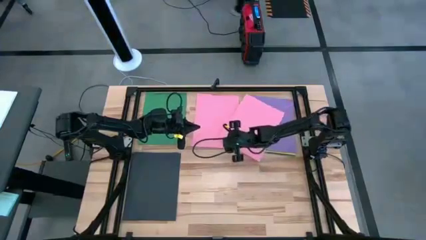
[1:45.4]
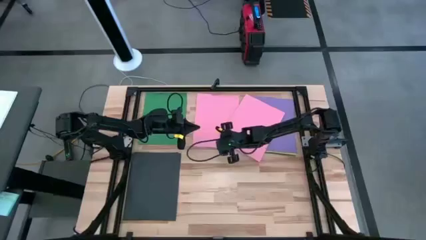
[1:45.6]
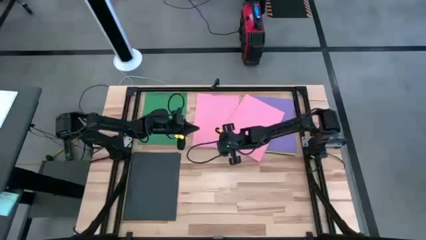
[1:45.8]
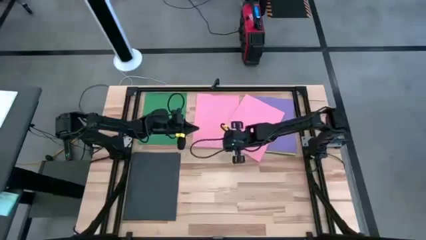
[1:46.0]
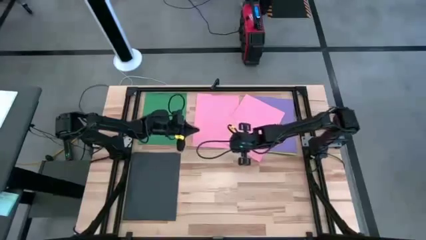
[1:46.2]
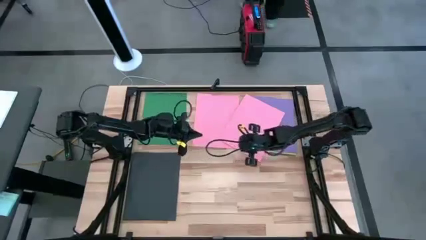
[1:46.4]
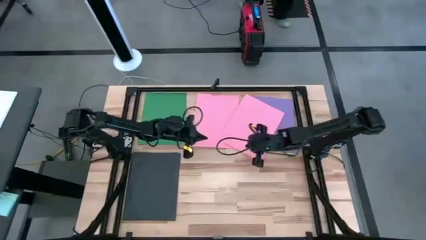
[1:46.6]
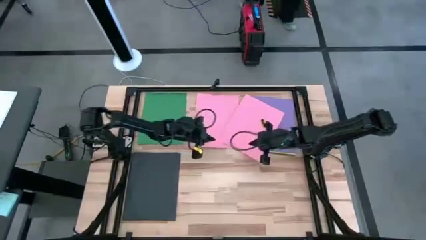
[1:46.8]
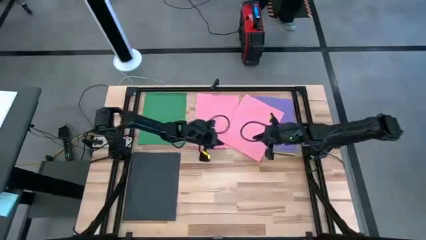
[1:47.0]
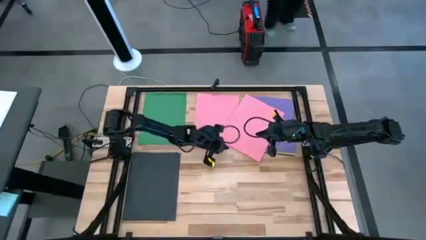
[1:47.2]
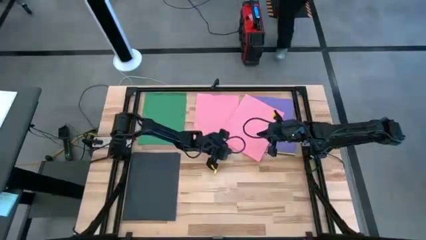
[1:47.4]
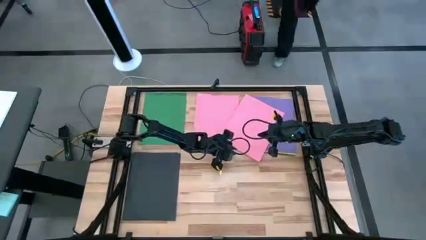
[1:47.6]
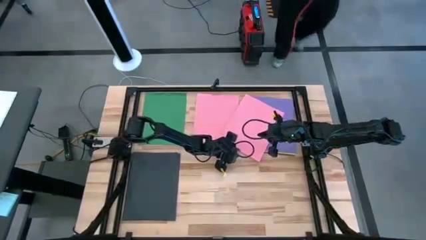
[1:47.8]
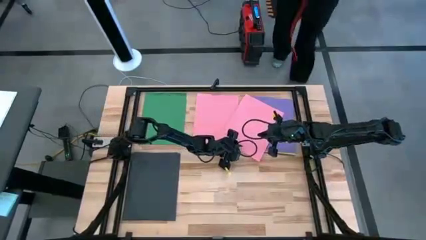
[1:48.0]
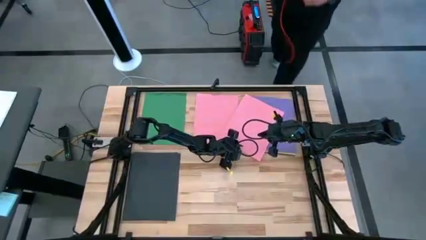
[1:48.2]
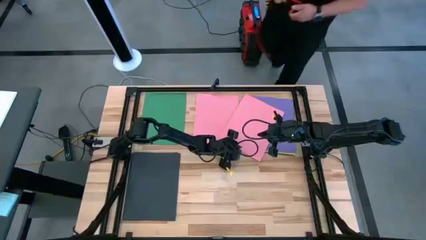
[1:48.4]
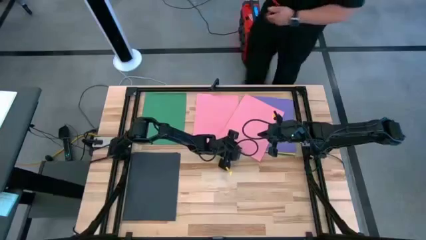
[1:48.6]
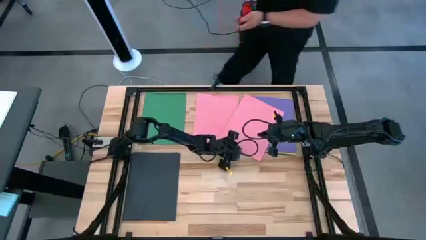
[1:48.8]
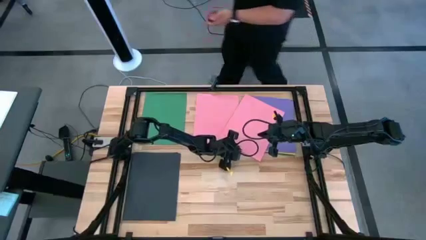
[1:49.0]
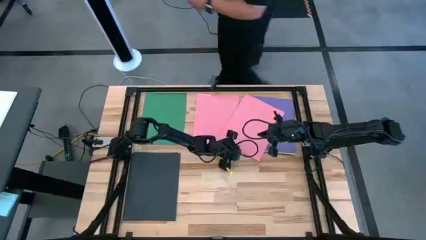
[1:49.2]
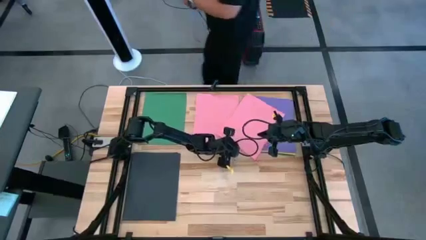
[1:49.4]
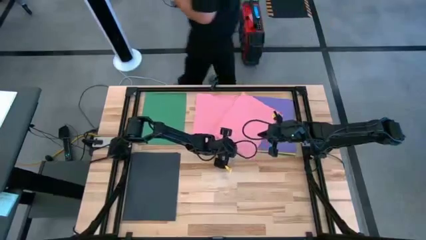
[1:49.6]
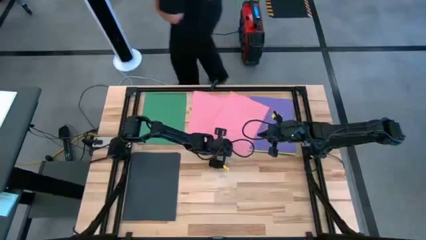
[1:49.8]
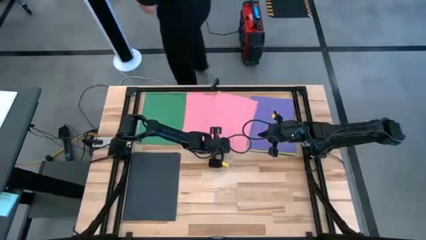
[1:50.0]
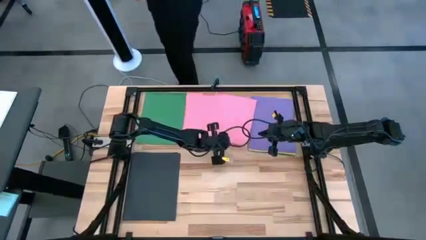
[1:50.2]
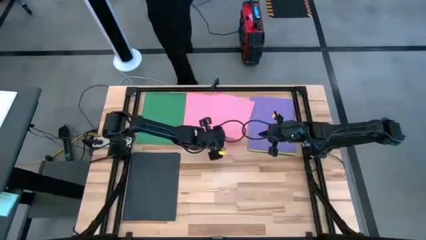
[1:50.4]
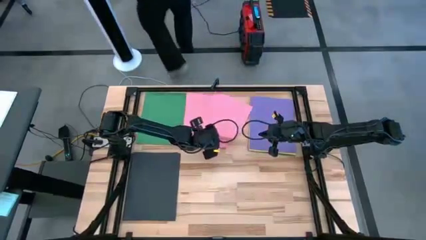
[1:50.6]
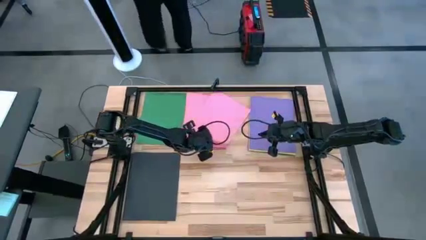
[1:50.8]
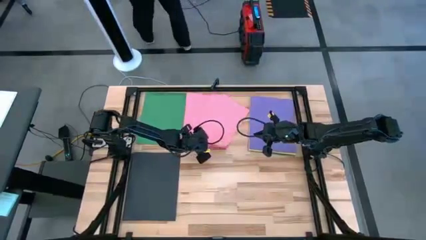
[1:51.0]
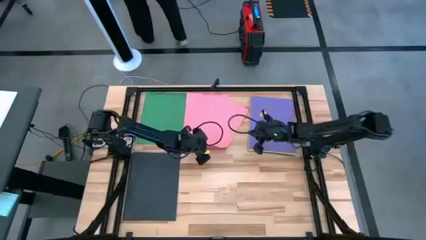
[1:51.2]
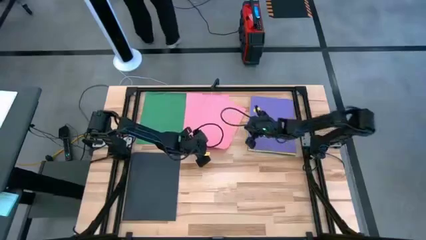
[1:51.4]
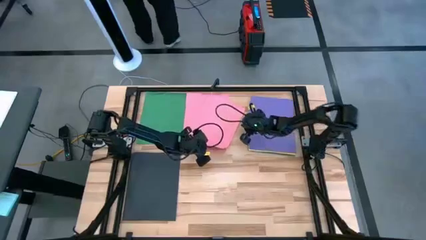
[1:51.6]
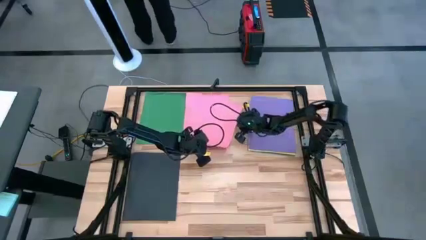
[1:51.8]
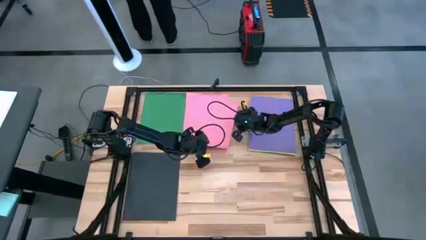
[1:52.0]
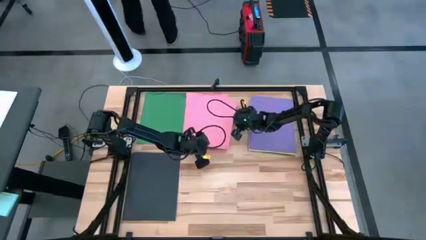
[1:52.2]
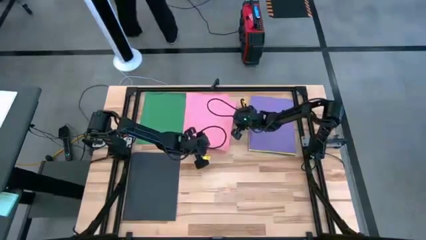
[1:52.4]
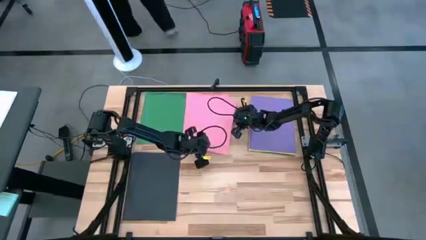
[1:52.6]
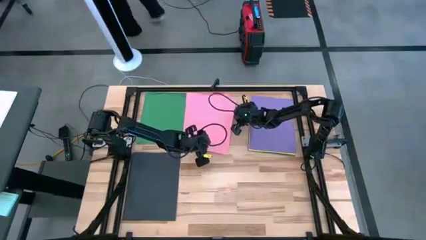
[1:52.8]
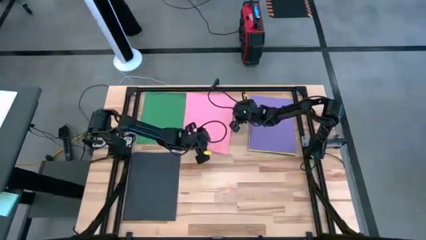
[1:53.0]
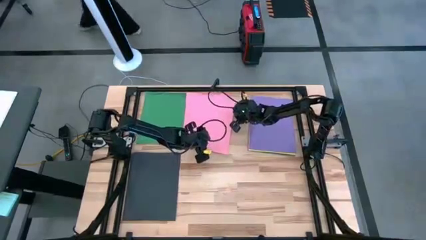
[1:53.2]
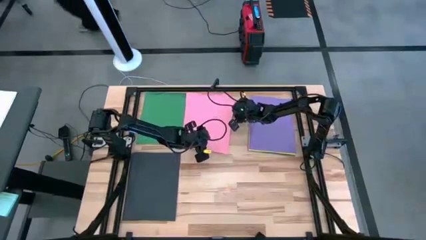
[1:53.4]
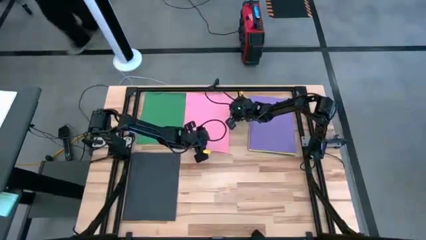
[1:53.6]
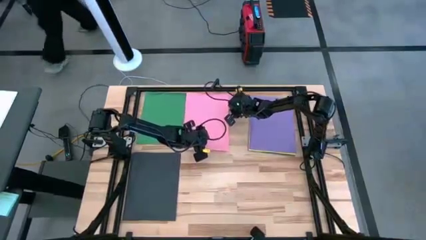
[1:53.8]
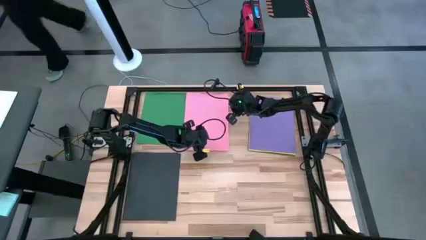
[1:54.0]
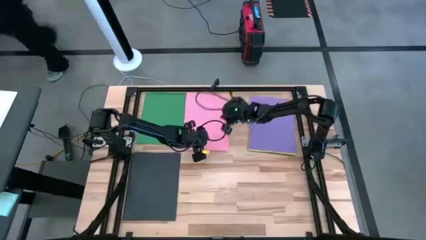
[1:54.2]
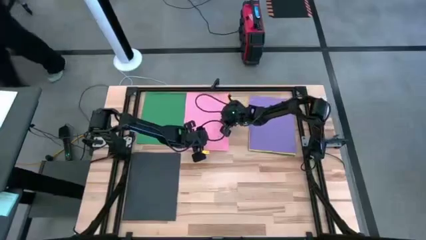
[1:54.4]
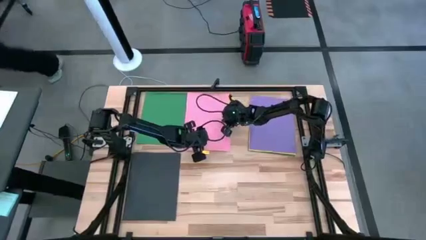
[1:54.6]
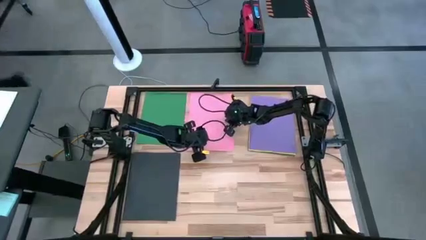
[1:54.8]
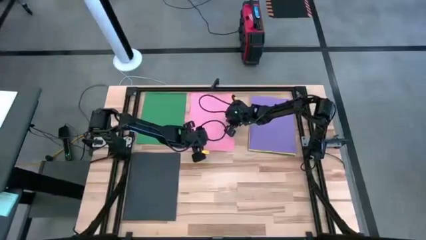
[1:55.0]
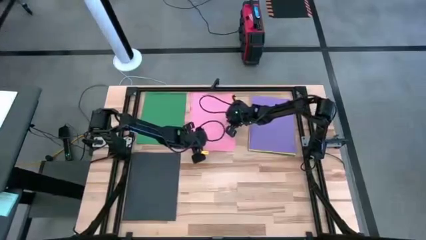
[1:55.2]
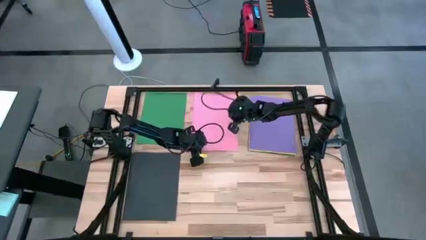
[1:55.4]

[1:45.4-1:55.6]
Task: Organize paper
Stack the pink paper on top of the pink paper

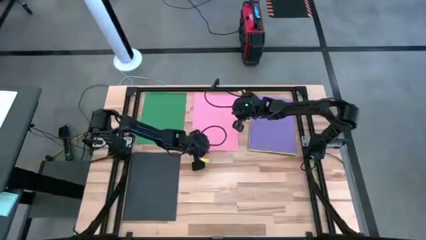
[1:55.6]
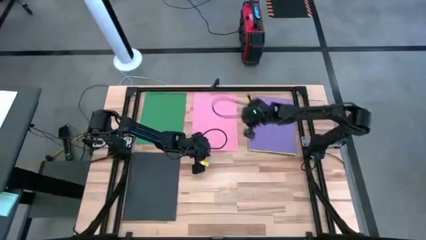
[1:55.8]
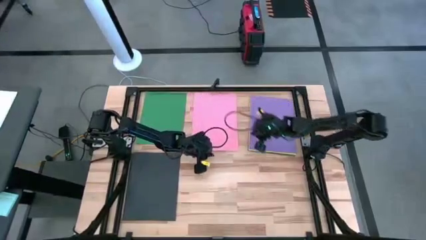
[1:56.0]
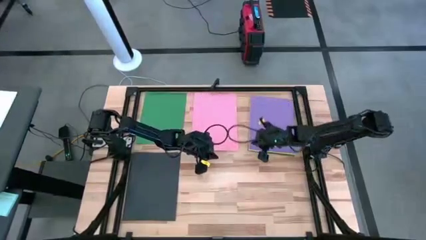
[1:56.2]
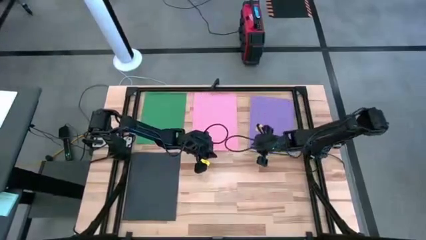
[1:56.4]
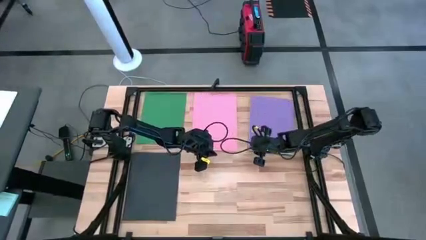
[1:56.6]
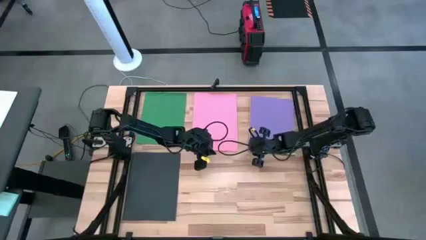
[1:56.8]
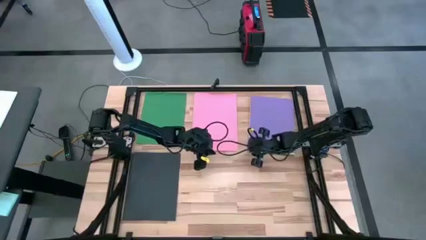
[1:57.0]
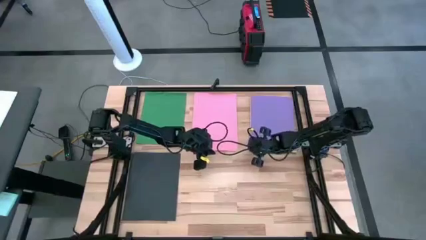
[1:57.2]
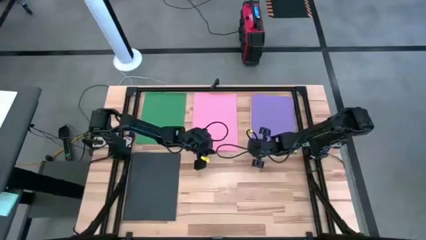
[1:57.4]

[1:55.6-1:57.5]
Move the violet paper to the bottom right of the table

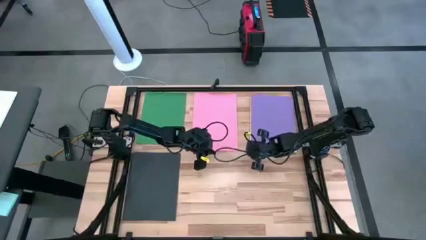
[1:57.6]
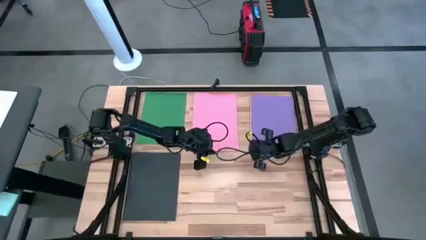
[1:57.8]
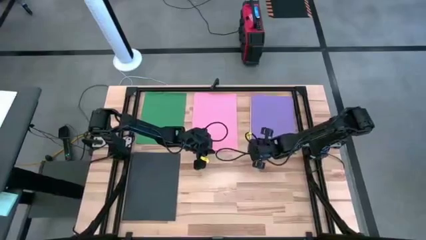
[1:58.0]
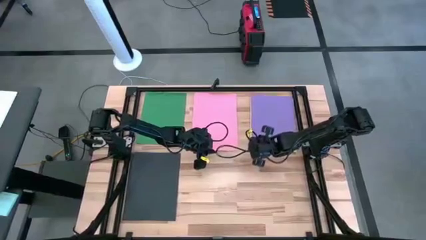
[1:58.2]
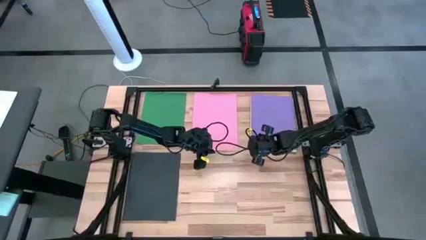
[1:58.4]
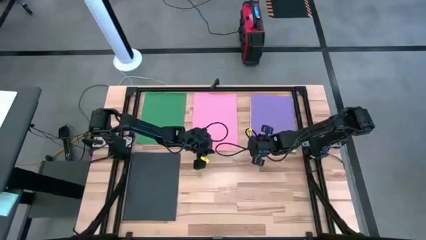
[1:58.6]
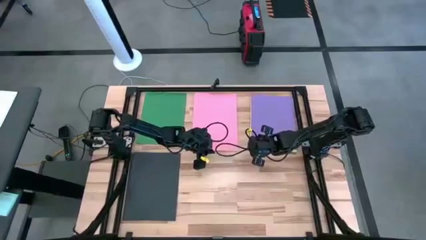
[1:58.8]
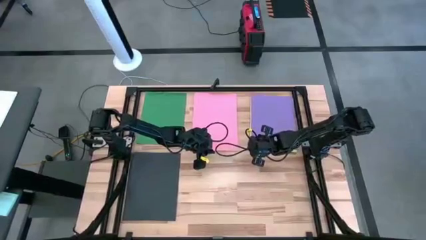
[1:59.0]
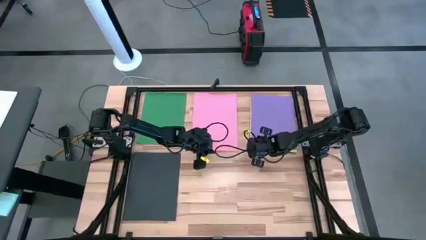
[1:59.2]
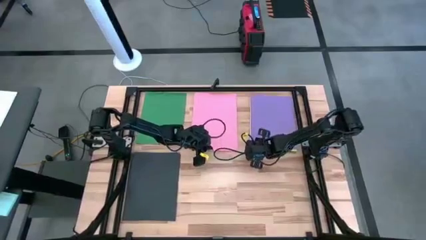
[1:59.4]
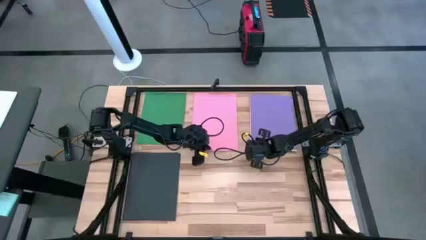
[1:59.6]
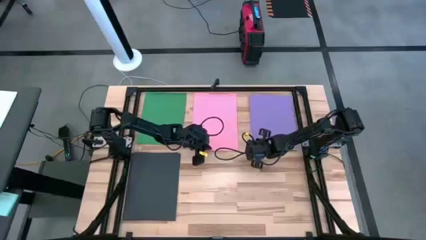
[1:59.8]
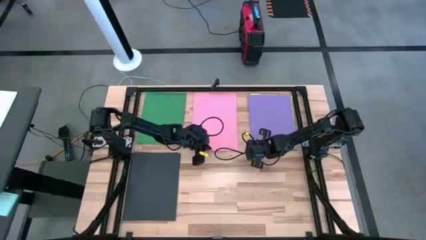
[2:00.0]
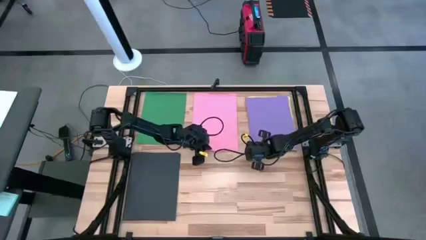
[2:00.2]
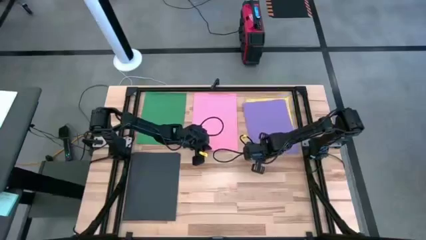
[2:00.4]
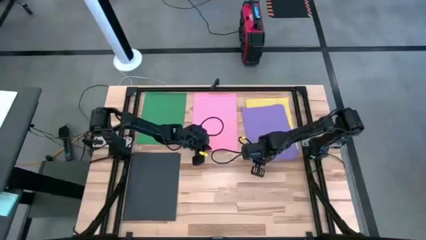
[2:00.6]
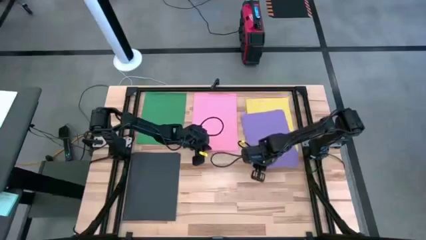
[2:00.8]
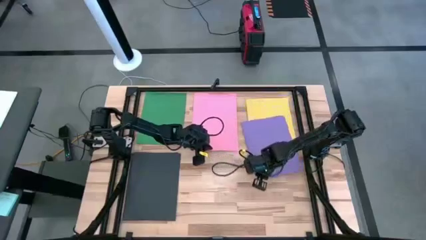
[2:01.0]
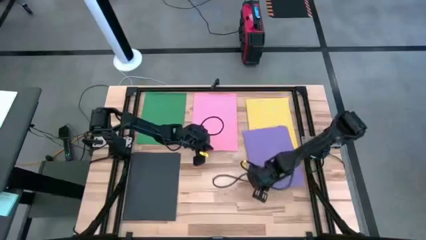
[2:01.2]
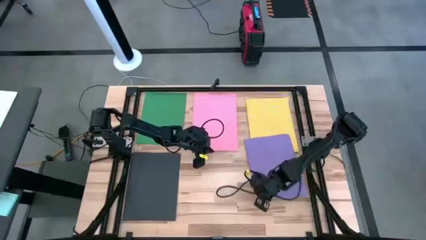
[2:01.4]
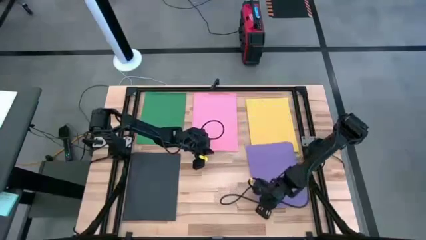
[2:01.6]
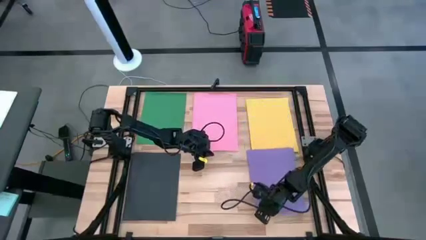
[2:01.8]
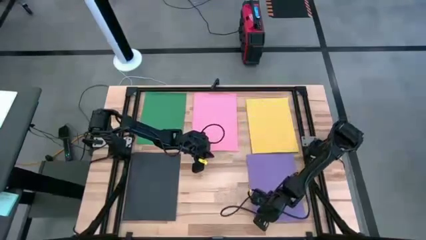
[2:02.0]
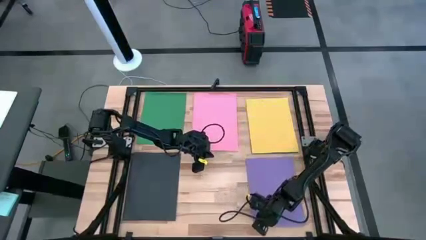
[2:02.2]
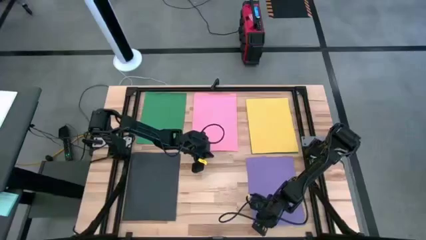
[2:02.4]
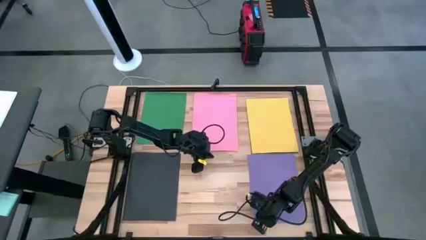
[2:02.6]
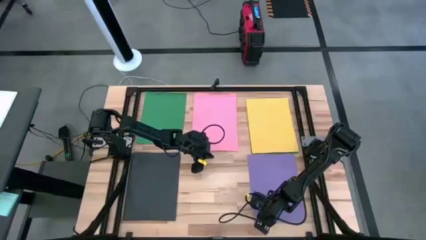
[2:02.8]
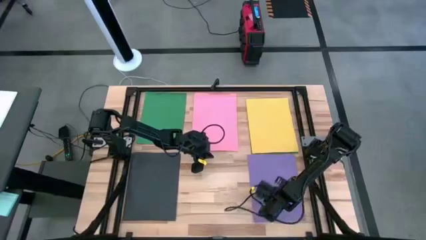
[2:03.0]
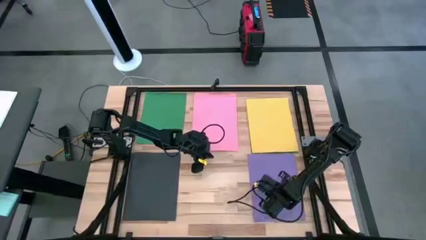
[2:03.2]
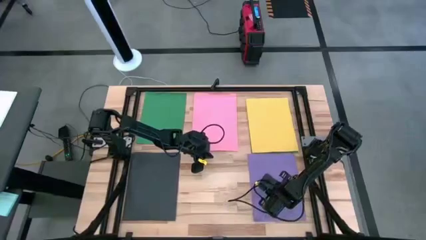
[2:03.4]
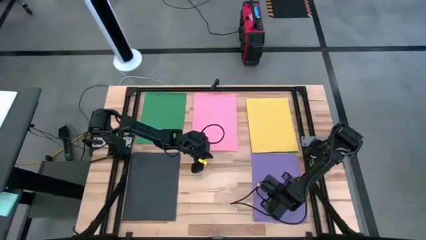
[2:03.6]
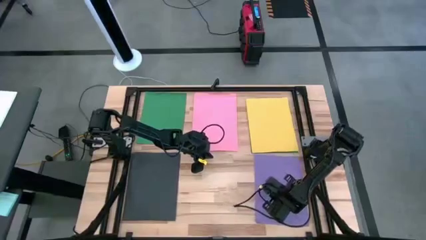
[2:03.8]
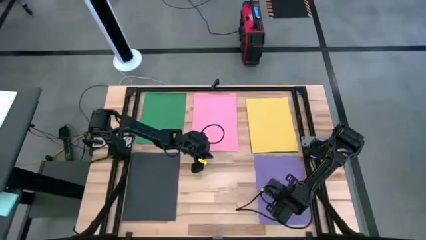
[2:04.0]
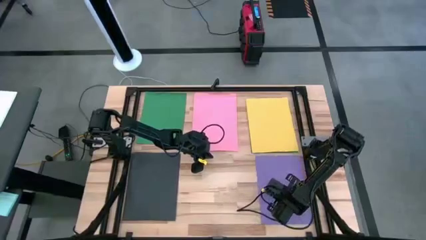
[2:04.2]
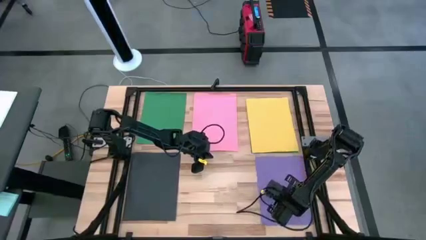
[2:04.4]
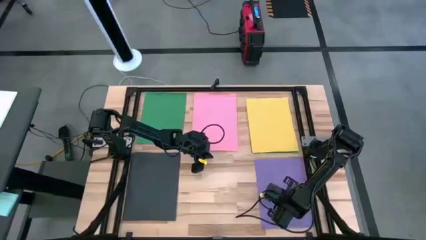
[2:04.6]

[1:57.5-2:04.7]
Move the violet paper to the bottom right of the table
